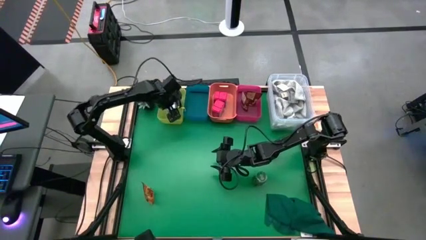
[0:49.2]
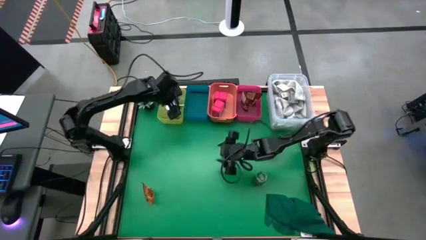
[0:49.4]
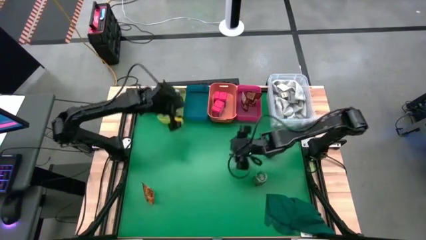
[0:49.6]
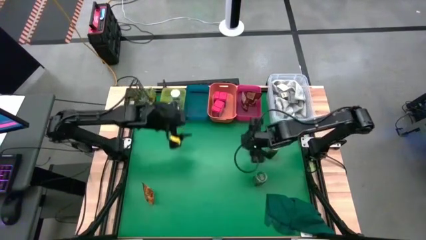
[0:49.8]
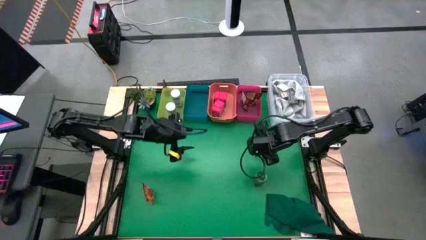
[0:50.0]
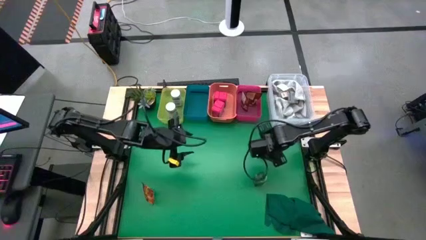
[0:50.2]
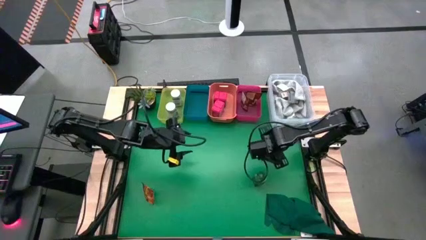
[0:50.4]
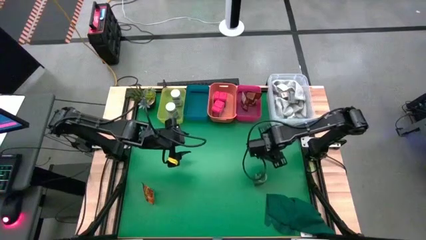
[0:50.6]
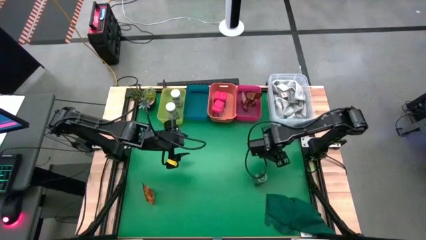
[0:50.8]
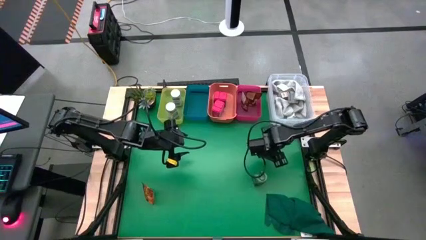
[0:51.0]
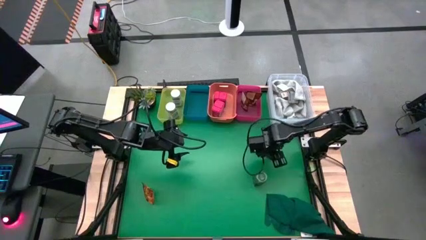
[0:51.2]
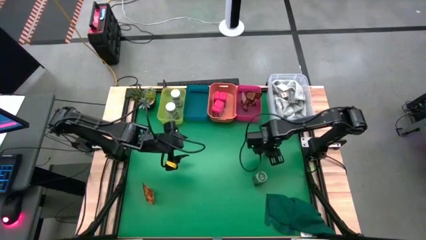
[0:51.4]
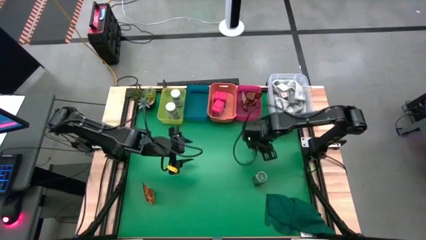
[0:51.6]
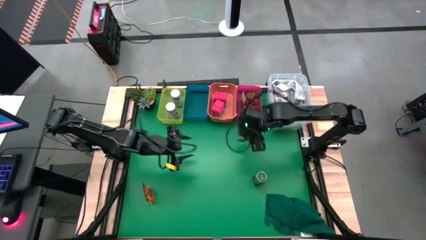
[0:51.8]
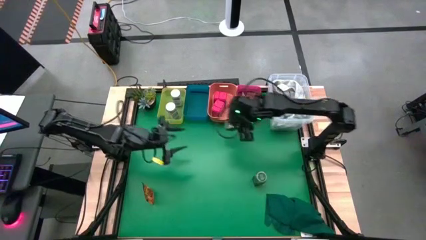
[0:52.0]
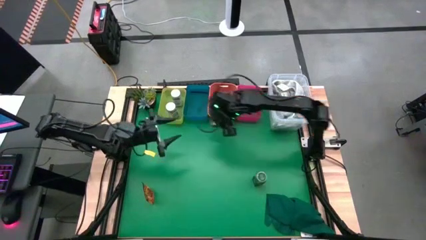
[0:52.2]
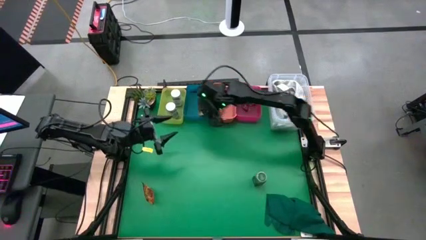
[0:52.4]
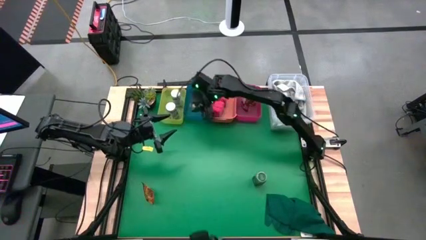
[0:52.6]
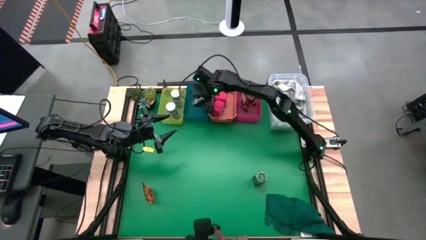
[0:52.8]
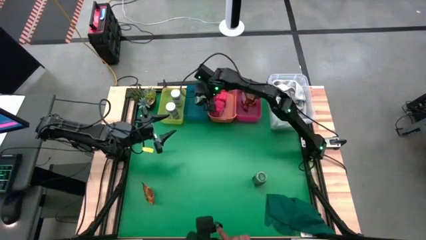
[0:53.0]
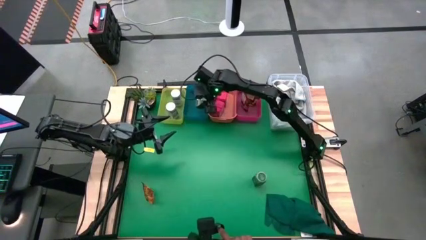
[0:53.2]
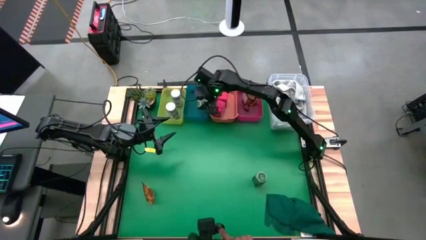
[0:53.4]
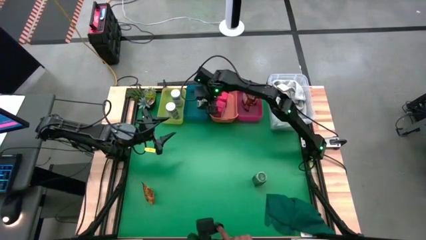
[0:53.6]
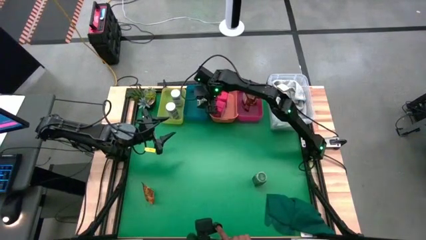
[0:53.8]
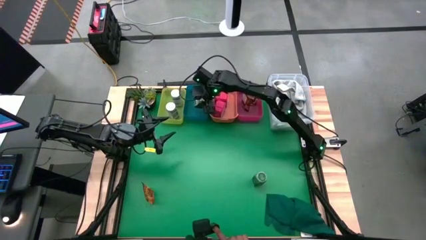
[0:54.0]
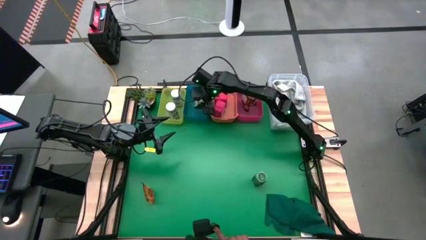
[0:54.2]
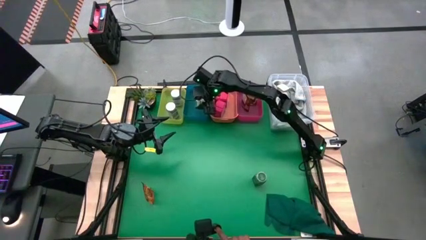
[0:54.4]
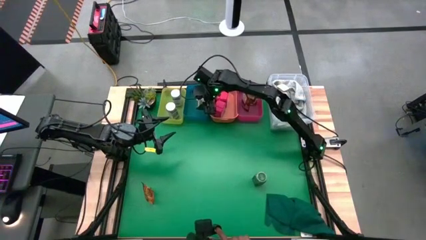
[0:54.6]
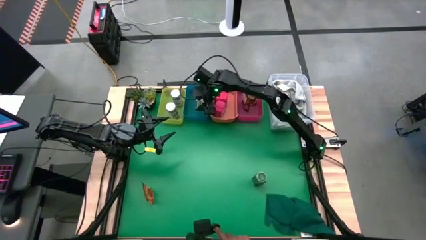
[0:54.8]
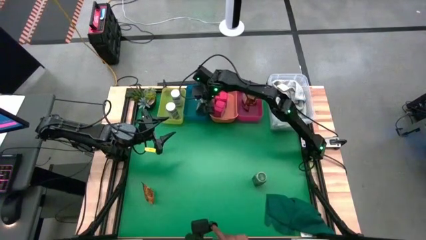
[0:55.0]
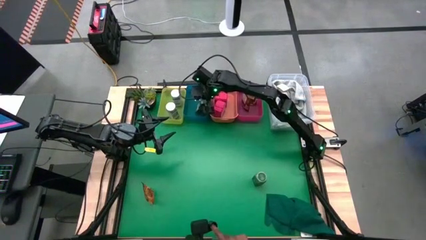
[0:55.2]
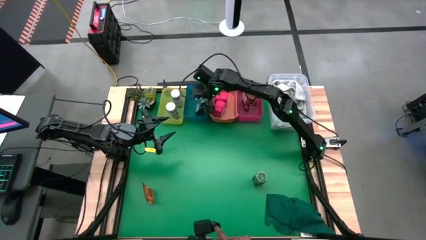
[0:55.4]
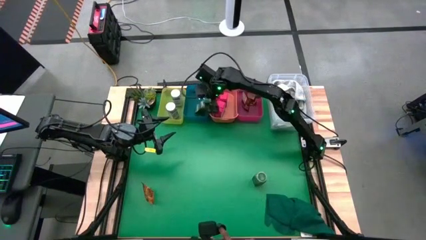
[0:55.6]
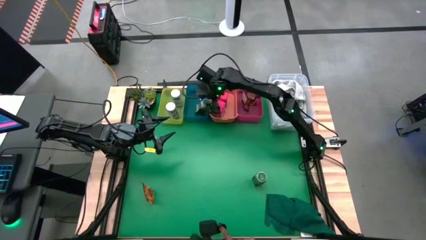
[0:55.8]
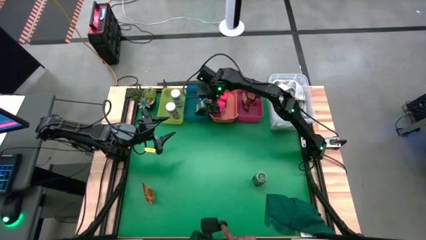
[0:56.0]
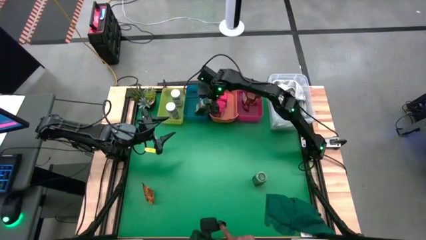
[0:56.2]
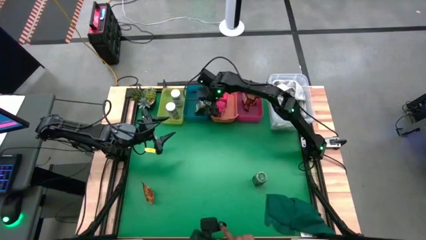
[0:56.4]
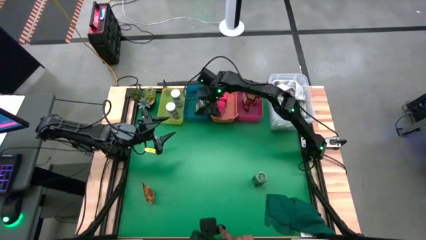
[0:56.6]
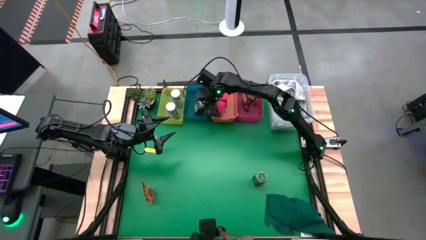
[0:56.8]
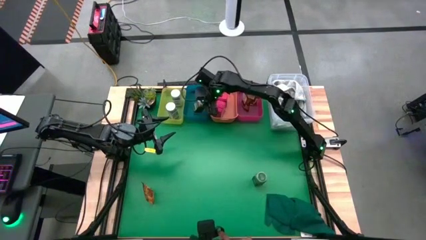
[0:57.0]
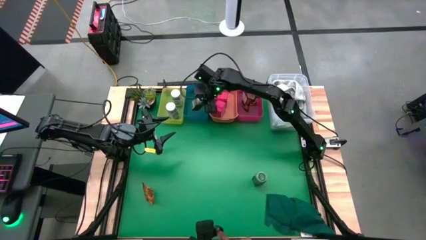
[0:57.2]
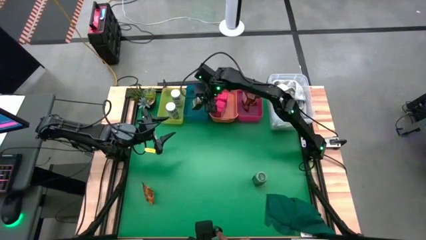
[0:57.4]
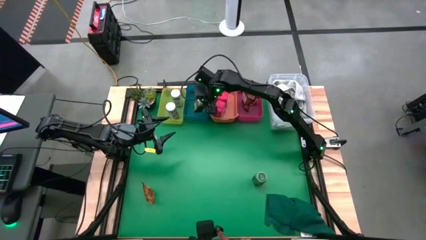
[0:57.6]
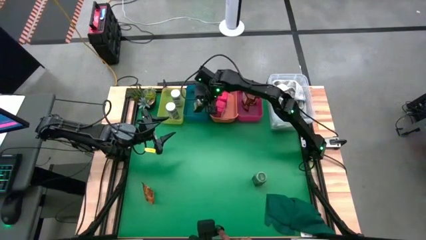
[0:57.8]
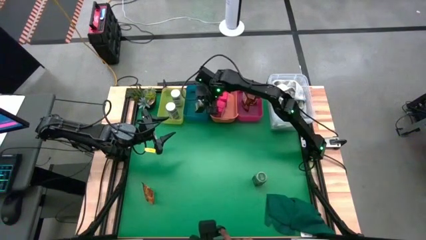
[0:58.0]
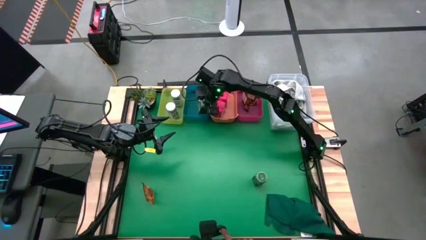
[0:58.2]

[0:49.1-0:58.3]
Task: Sort spices by type
Put the top green seasoning bottle into the blue bin

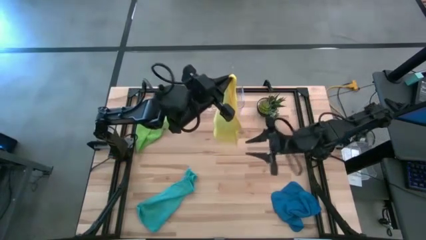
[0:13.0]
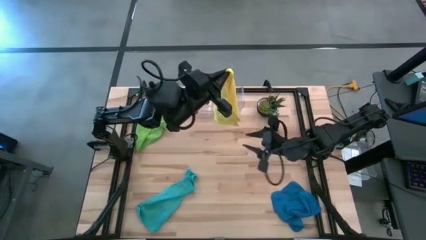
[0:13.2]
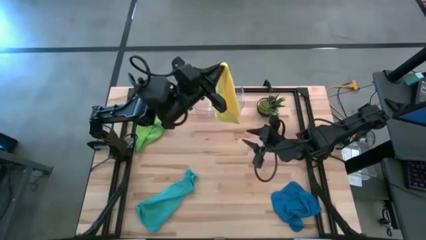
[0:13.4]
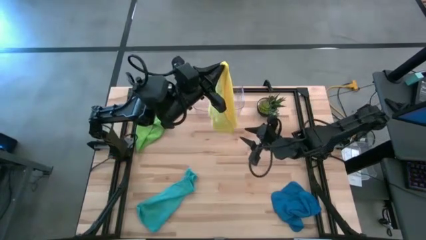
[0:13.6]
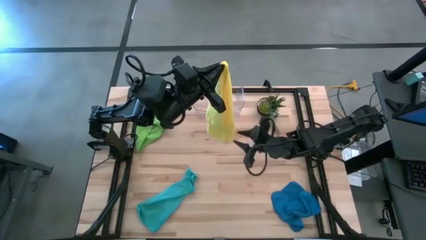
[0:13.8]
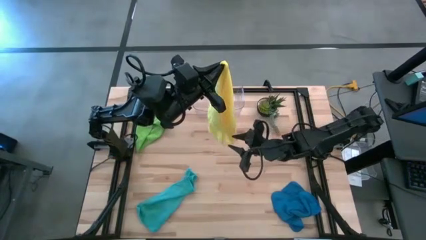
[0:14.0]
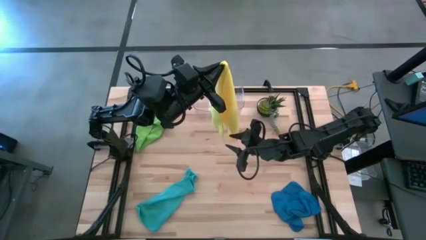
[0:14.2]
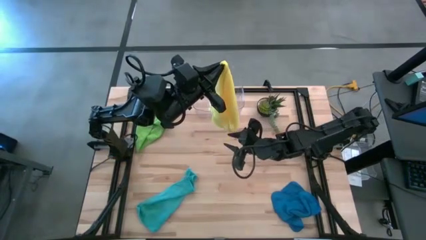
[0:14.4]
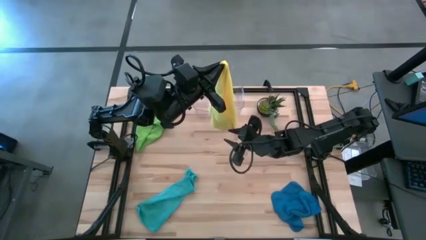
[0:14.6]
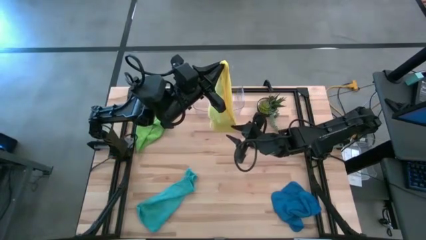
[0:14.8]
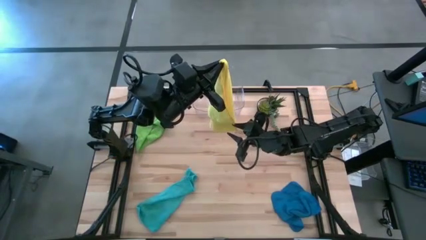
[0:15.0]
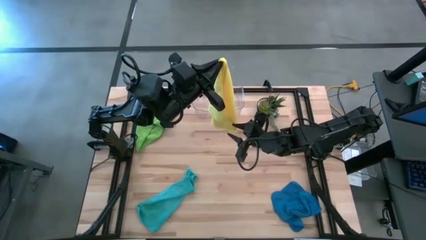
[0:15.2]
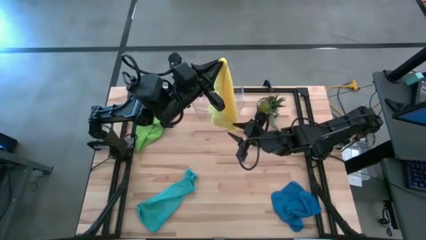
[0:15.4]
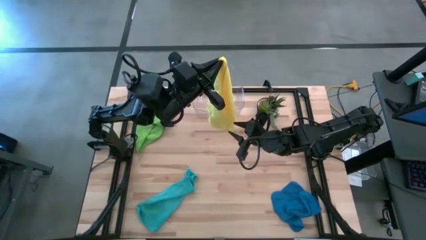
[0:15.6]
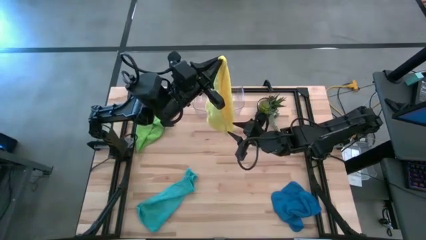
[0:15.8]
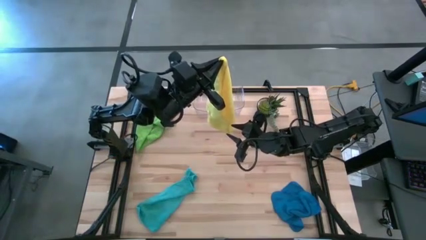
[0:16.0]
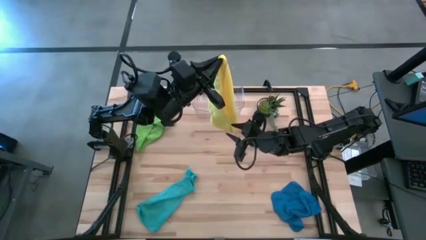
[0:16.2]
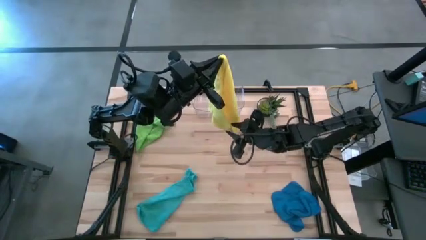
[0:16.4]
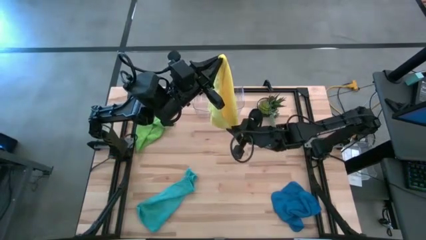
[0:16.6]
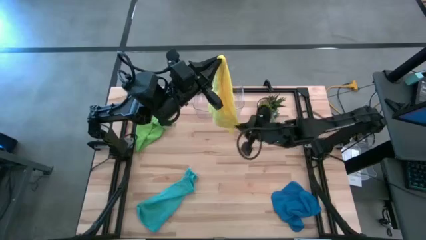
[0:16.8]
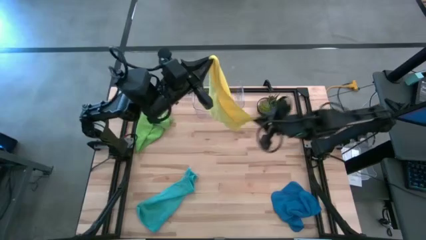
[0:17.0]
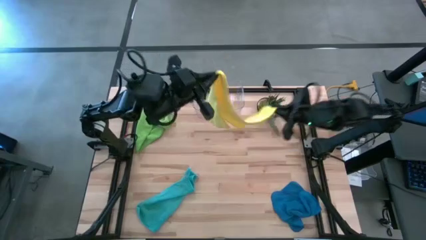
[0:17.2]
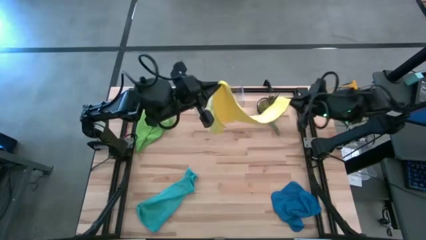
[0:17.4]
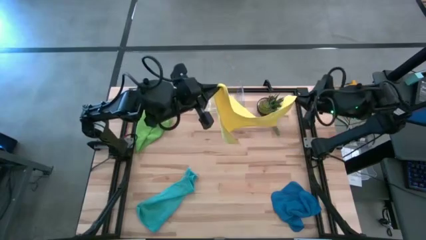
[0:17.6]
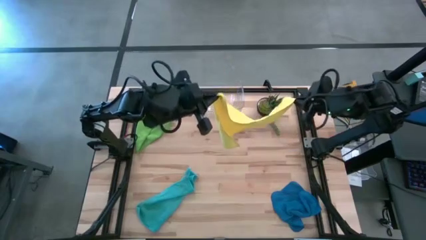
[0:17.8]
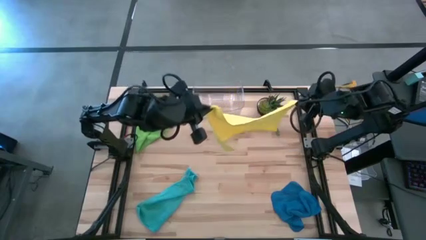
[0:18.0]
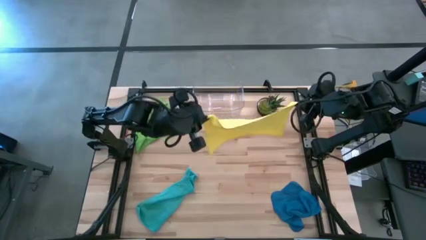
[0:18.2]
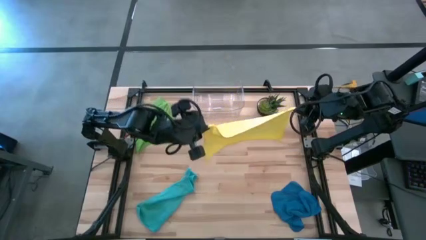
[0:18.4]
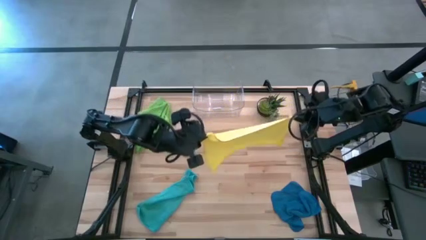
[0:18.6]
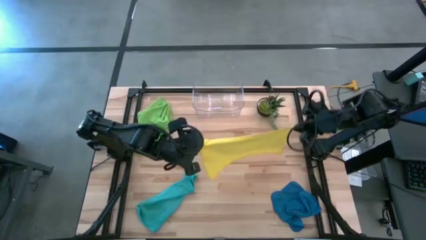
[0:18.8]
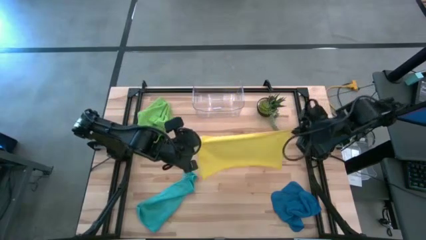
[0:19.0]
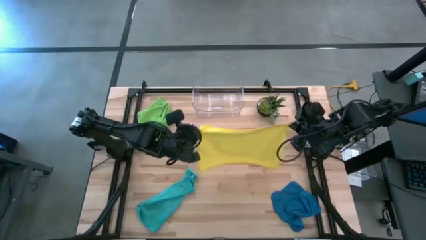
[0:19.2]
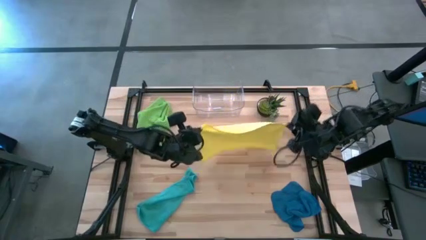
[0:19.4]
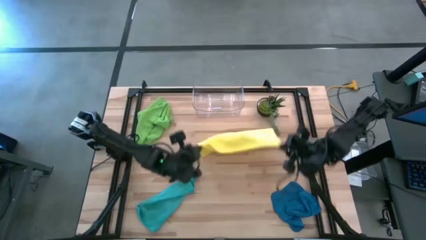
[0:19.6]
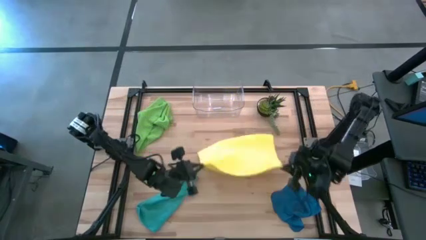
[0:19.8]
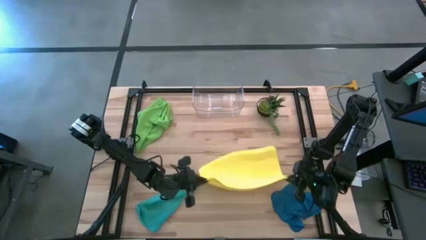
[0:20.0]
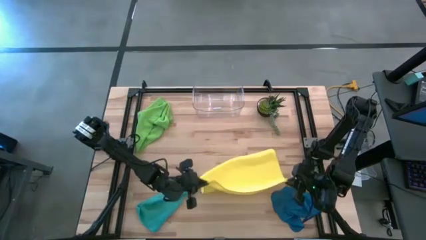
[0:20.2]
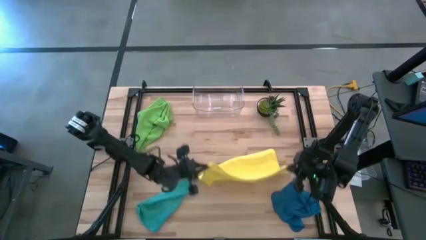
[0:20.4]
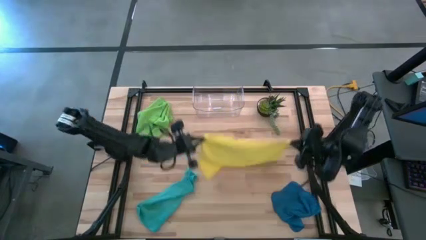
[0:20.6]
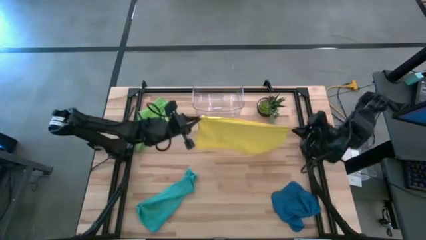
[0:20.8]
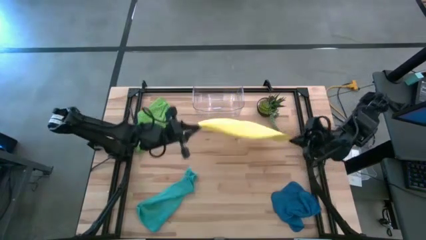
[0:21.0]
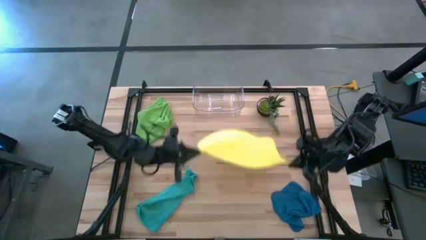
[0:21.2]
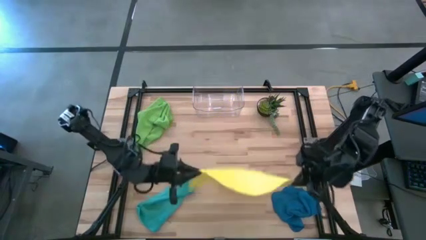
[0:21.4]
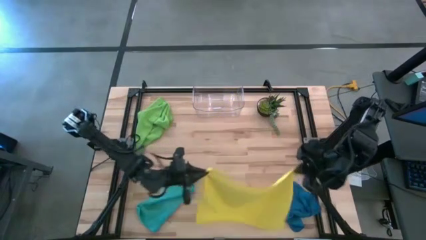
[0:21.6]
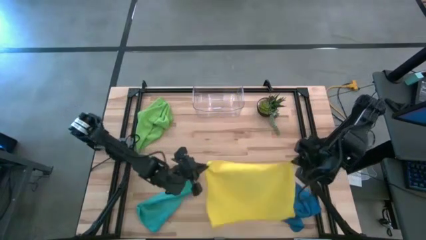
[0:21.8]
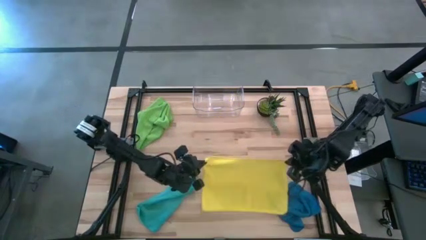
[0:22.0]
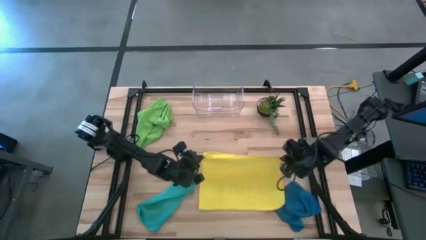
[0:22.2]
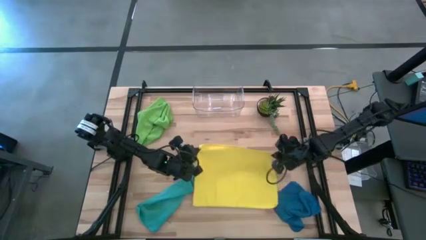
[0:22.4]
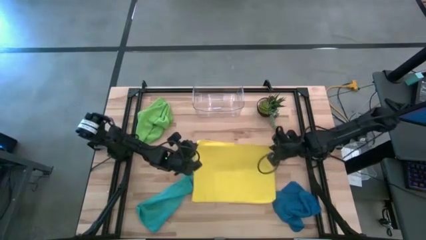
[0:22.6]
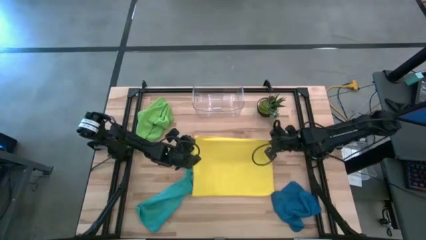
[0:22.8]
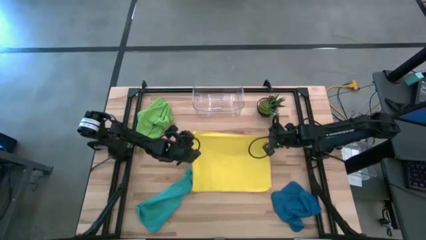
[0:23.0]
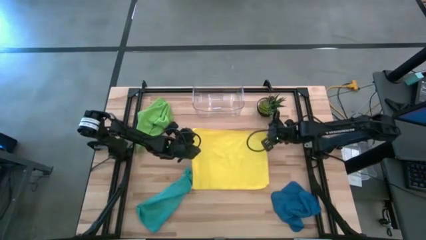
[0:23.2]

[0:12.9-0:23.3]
Task: Fold microfiber towels
Prepare the yellow microfiber towel
